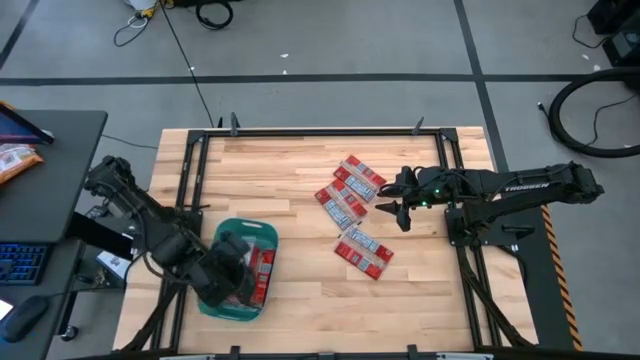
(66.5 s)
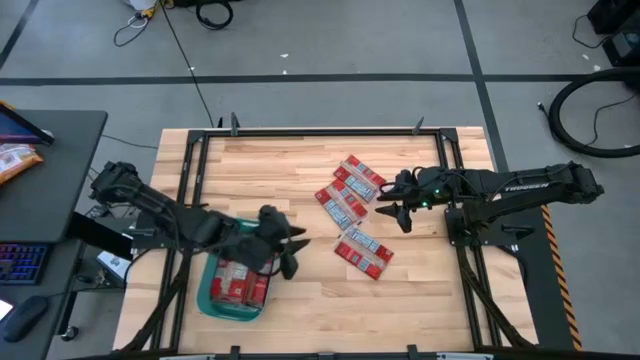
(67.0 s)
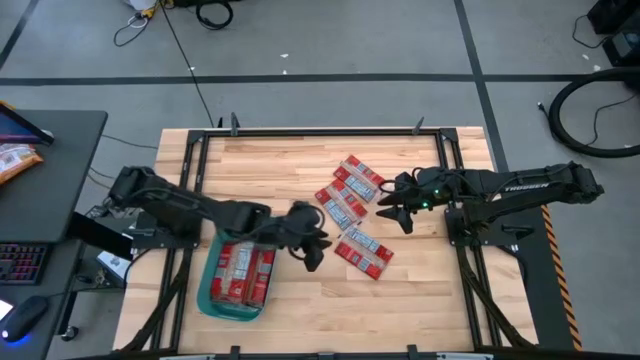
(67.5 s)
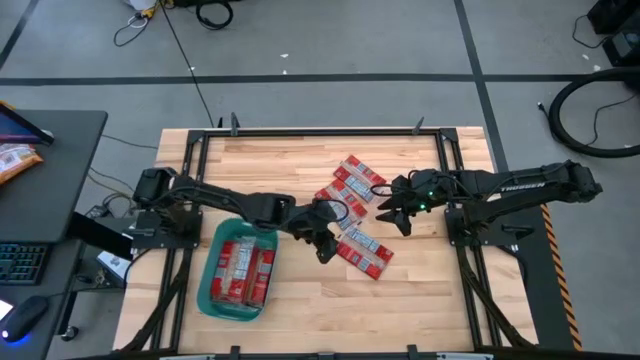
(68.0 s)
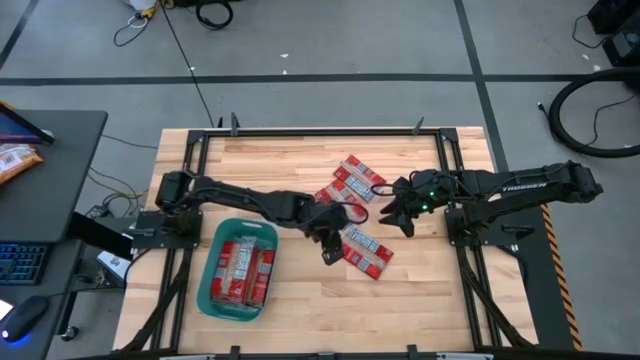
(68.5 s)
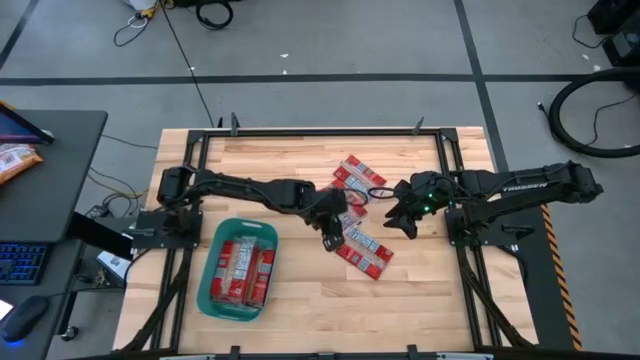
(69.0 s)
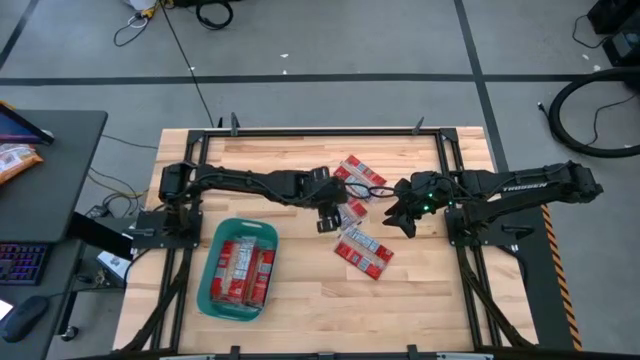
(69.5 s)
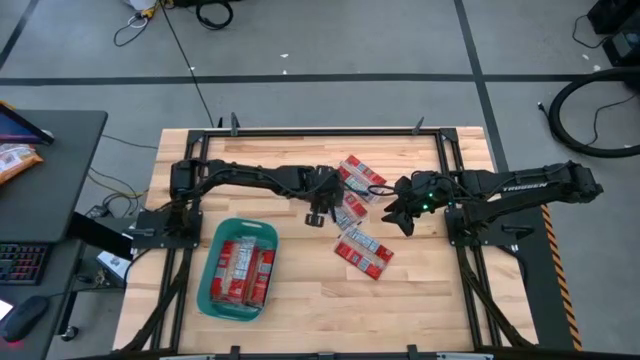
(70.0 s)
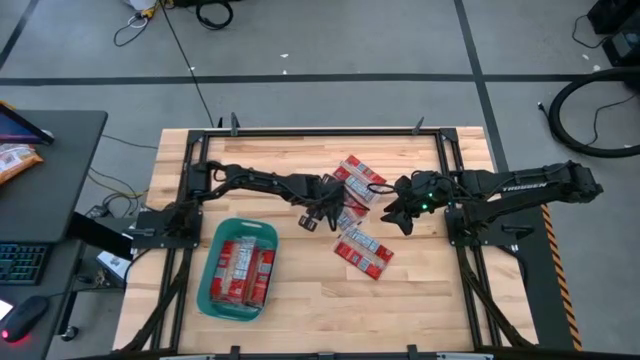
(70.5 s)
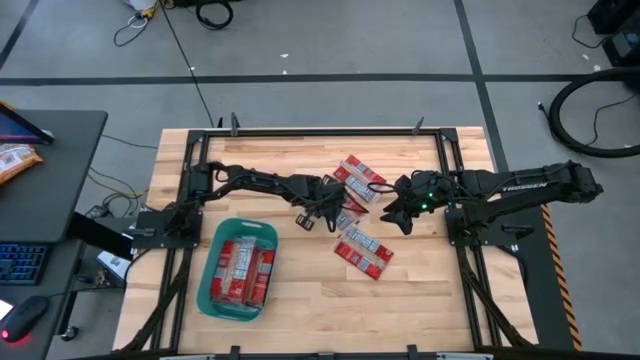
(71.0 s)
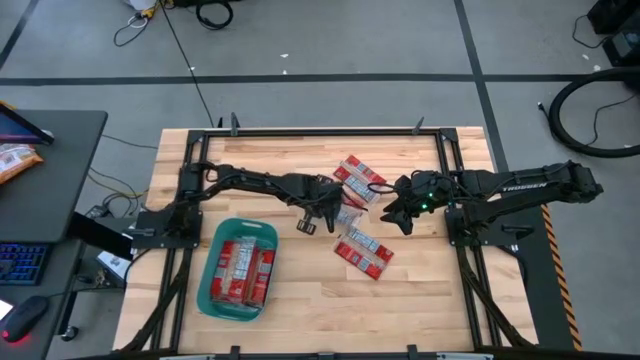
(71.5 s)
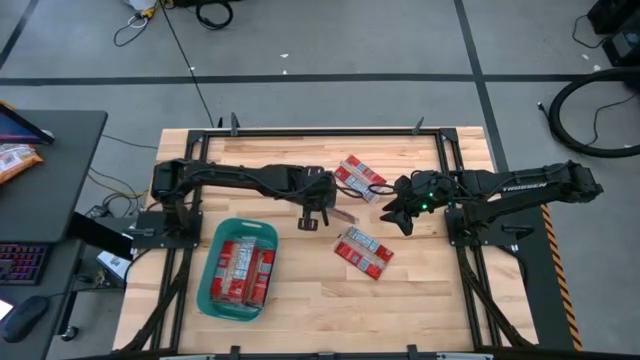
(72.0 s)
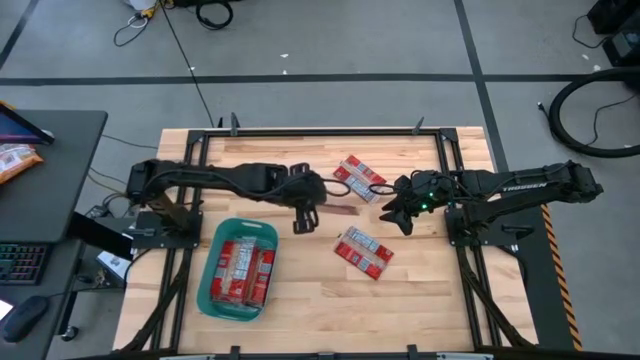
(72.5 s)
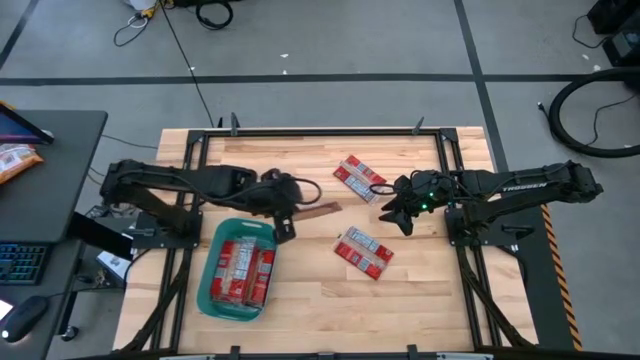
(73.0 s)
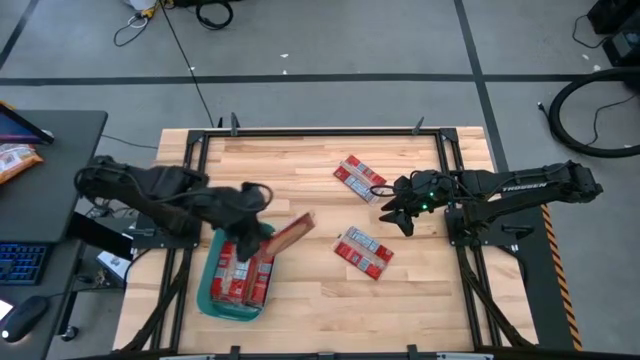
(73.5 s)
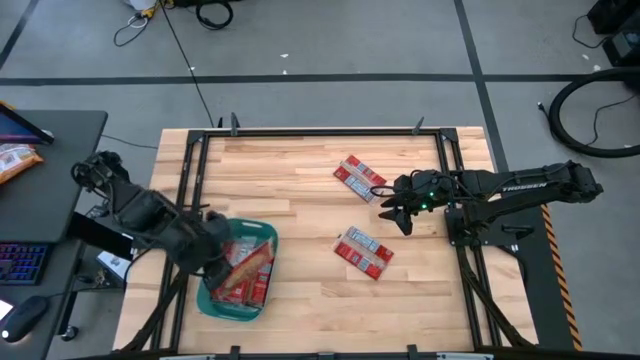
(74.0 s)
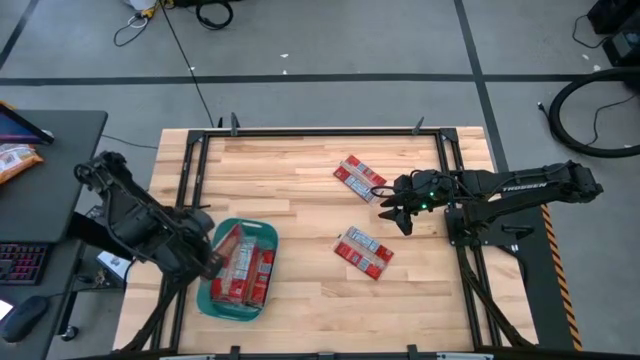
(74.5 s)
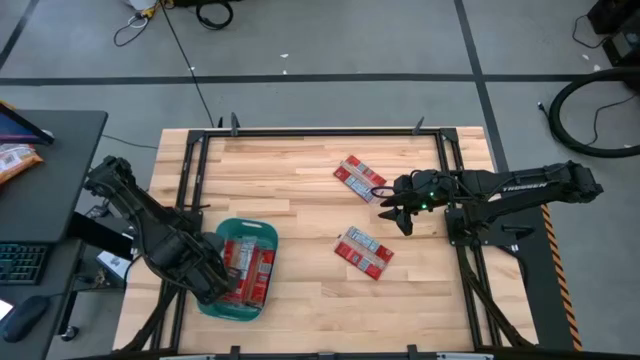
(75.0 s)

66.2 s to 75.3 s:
Task: Sort popcorn bags into baskets
Put the red popcorn bag into the green bin

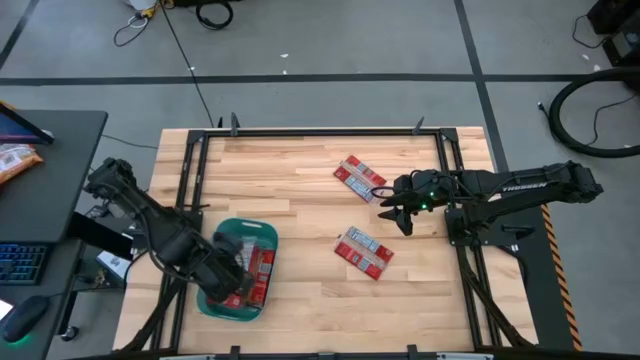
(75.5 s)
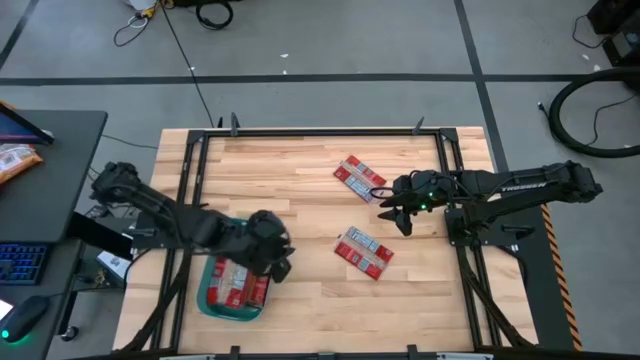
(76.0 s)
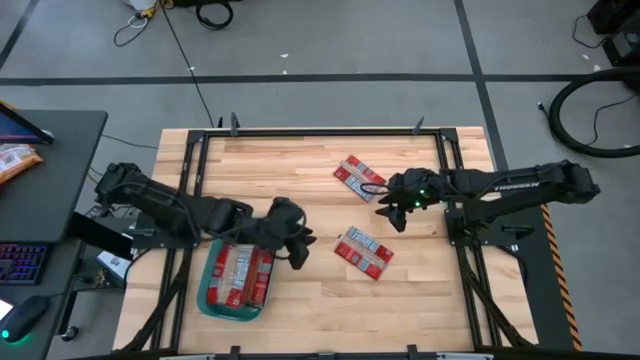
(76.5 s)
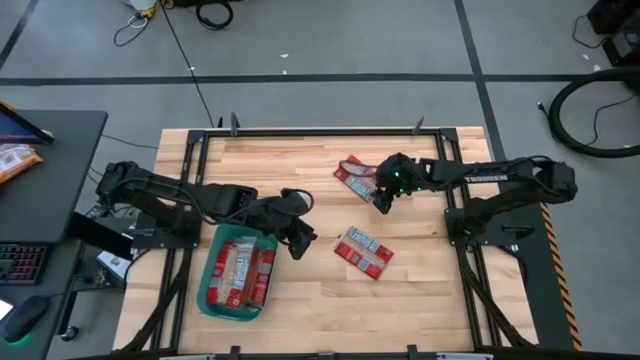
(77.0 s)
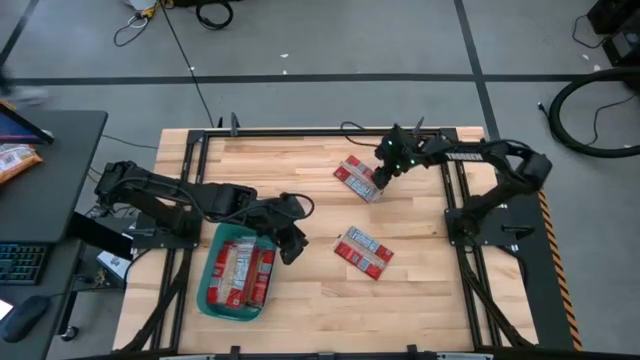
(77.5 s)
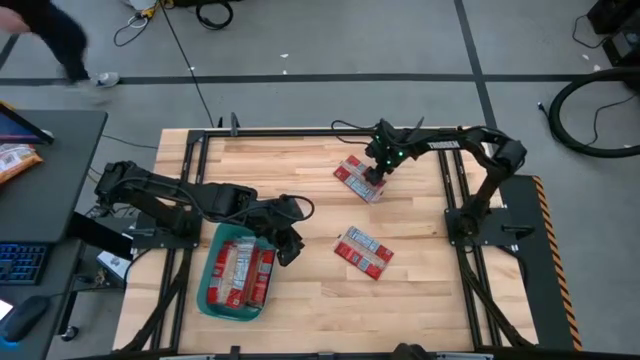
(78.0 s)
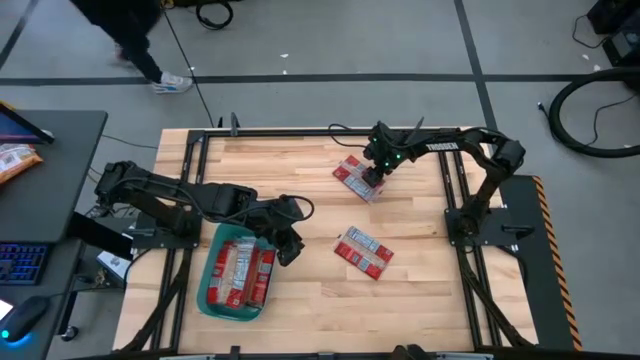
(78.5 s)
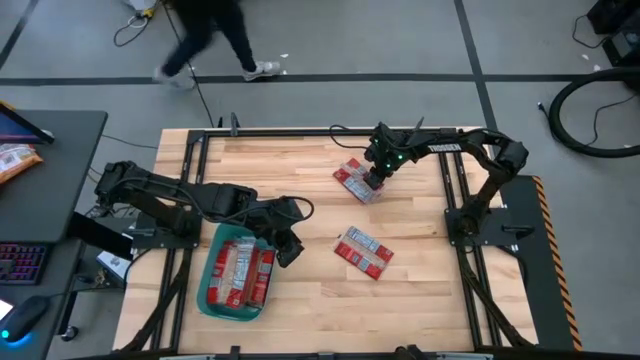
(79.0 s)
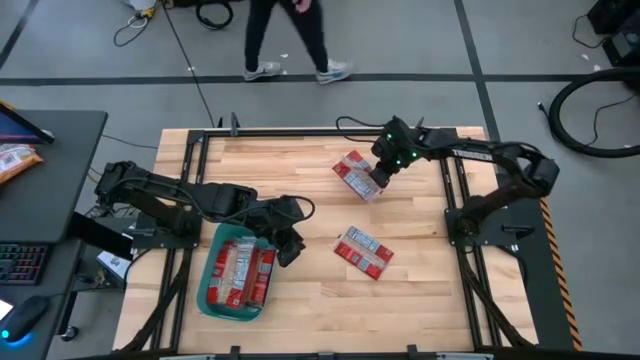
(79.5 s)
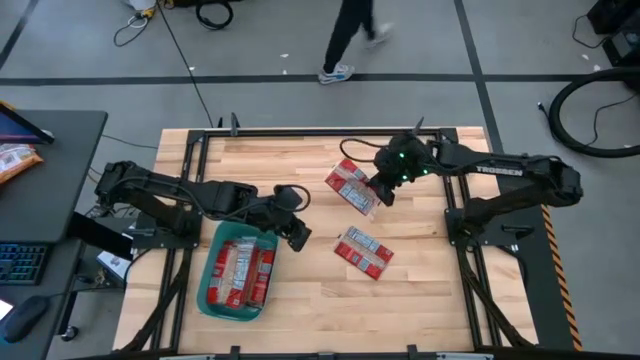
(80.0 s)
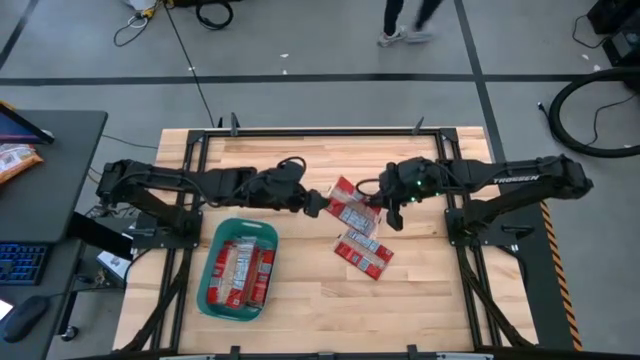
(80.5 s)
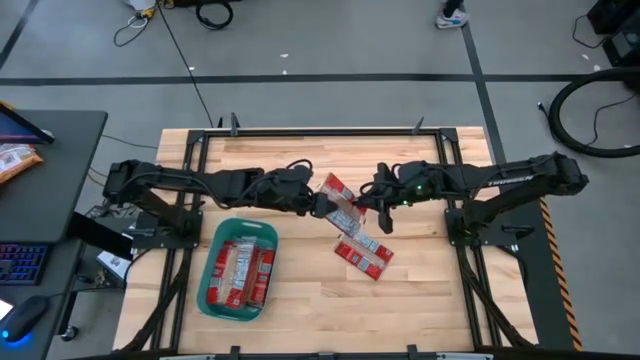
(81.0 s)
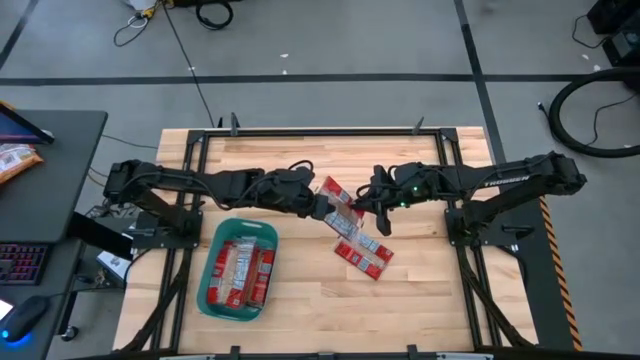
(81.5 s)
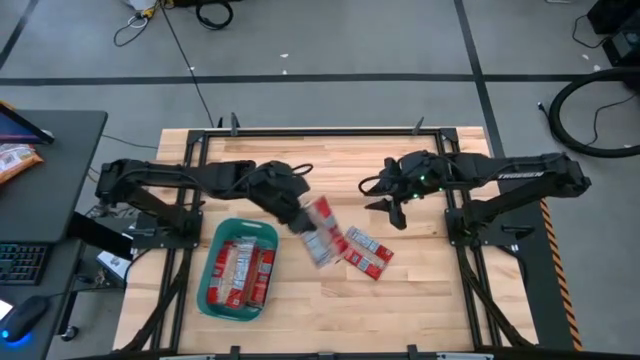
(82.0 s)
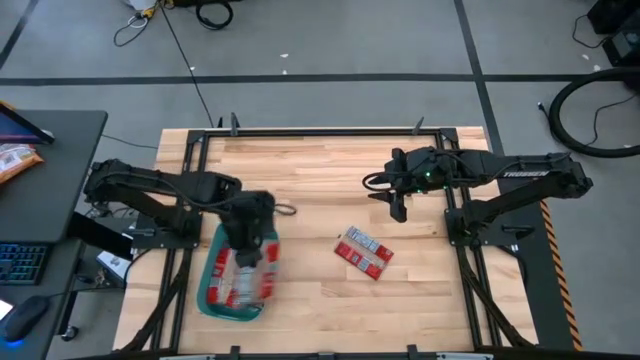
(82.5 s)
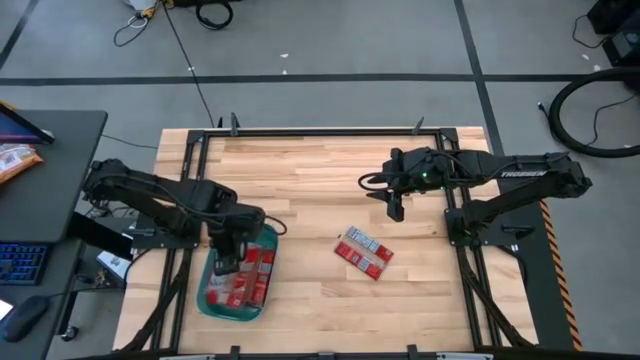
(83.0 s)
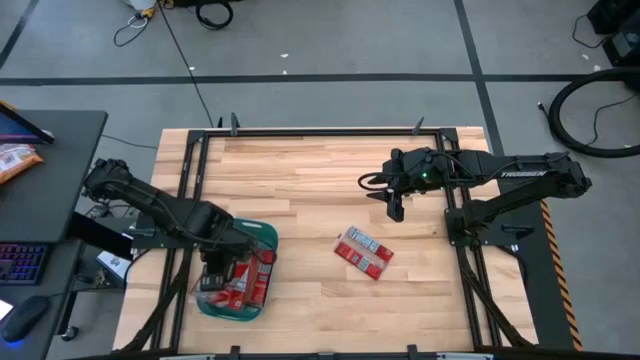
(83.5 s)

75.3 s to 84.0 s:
Put the red popcorn bag into the green bin

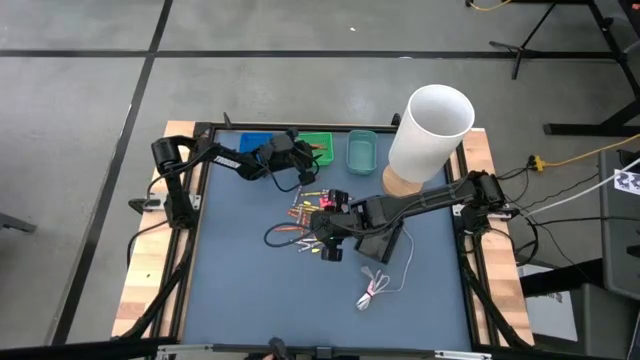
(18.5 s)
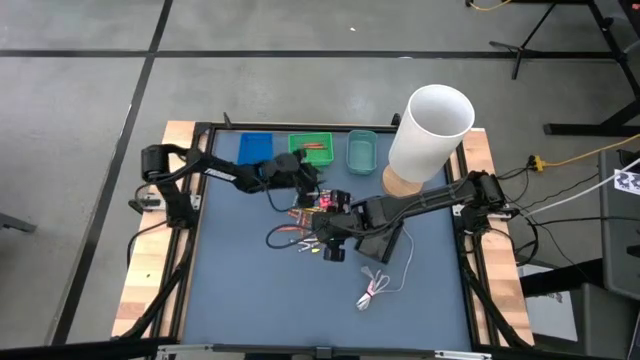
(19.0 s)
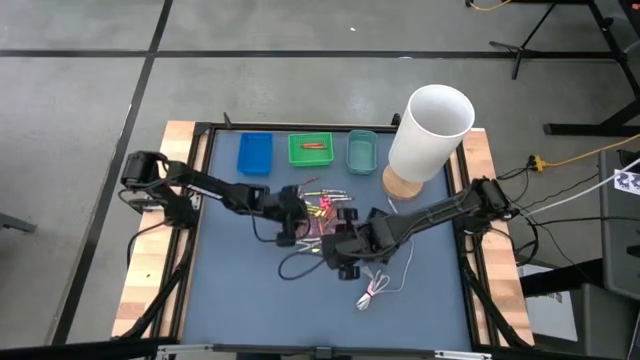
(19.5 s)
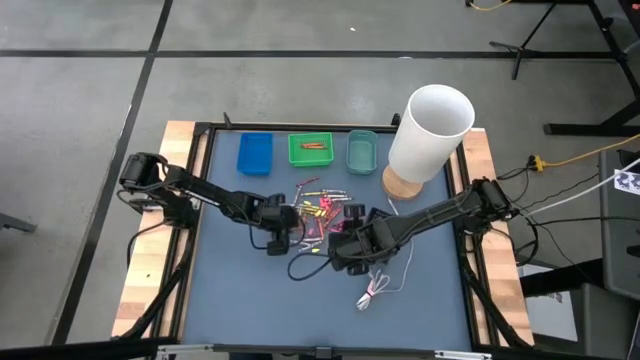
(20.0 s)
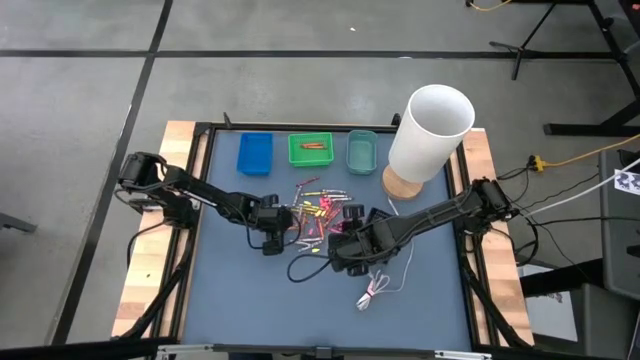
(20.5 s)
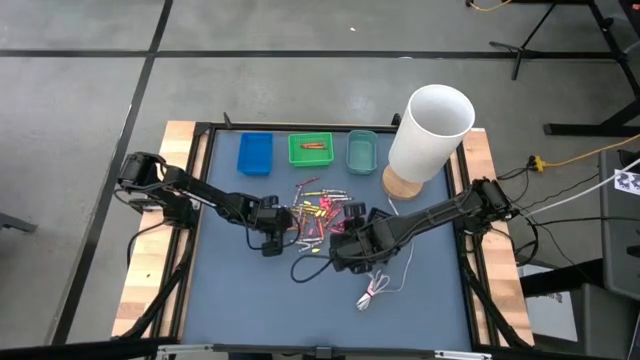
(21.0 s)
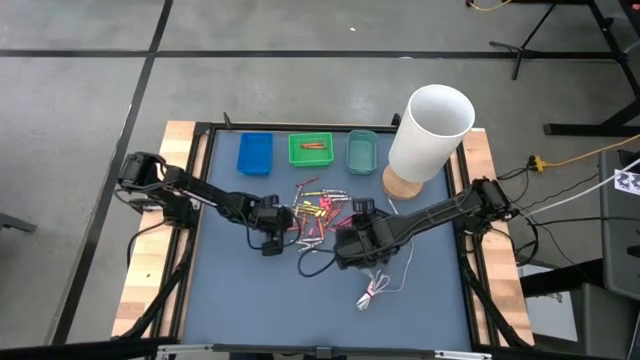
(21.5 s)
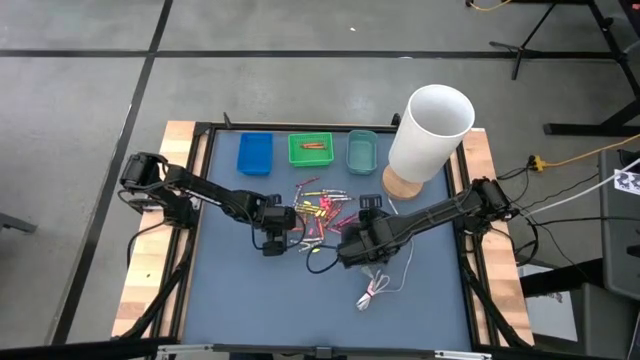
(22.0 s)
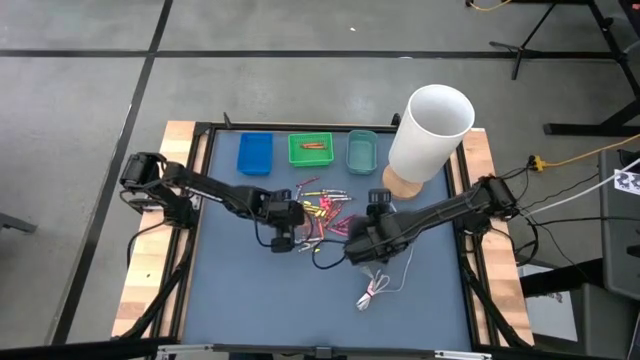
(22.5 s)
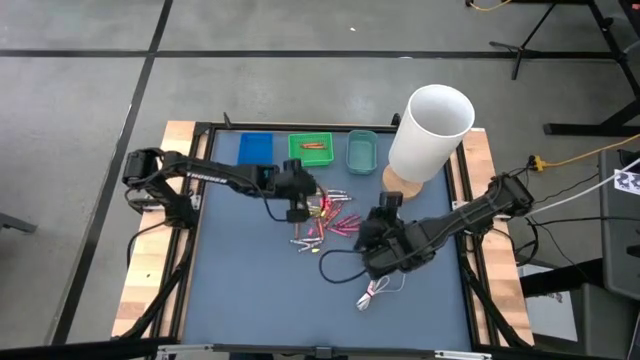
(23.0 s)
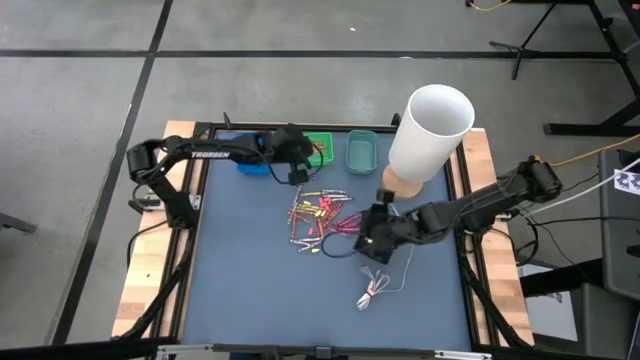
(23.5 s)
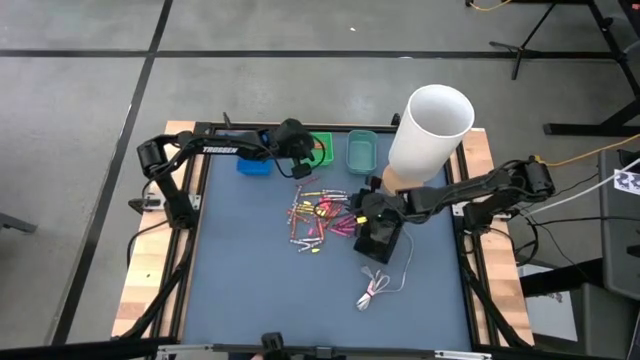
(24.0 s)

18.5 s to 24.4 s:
Task: Sort crayons
Put the orange crayon into the green bin
